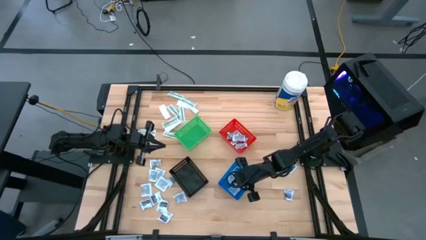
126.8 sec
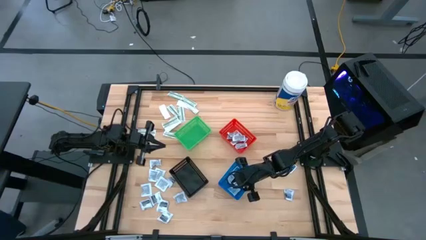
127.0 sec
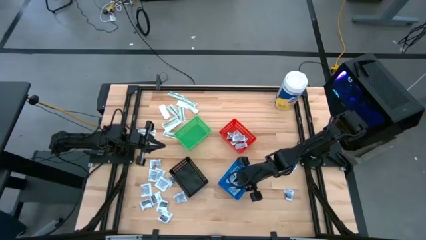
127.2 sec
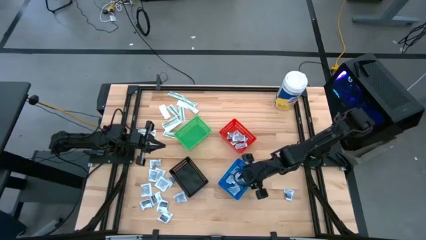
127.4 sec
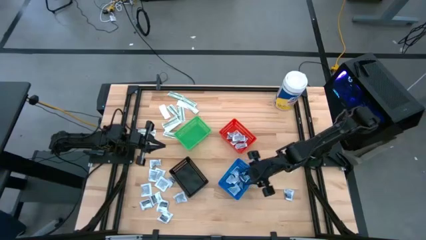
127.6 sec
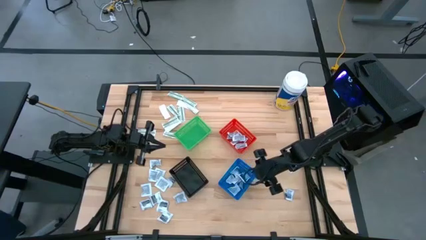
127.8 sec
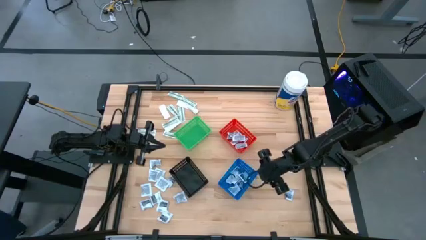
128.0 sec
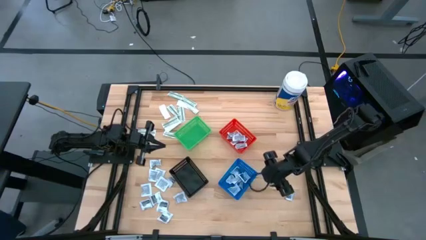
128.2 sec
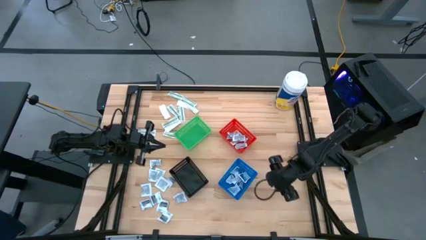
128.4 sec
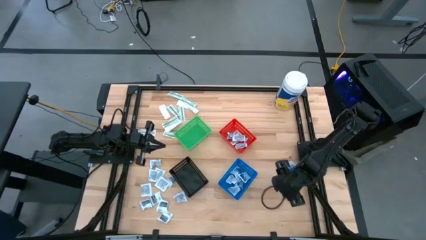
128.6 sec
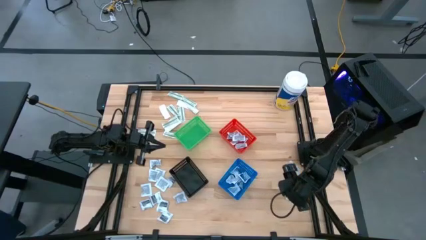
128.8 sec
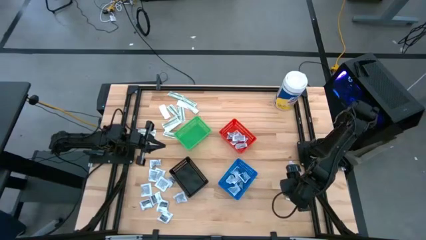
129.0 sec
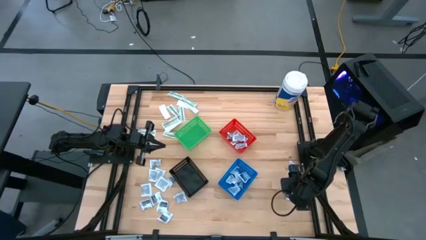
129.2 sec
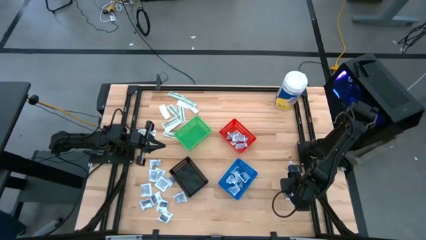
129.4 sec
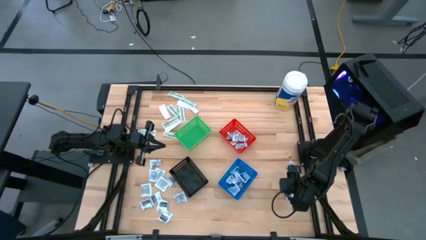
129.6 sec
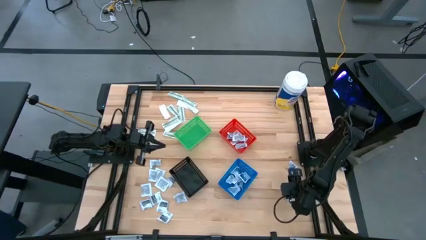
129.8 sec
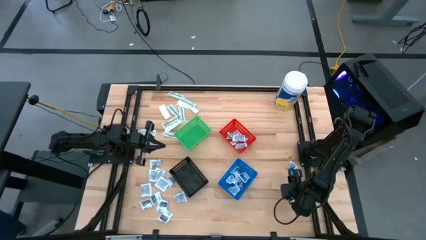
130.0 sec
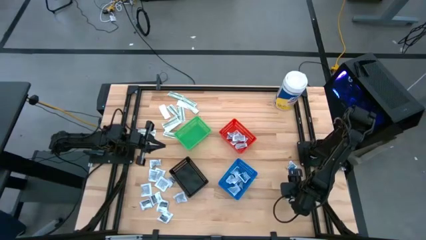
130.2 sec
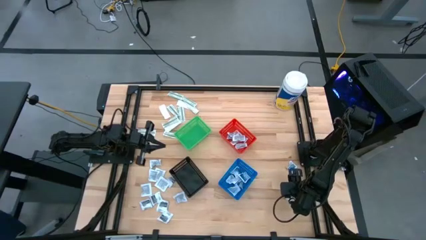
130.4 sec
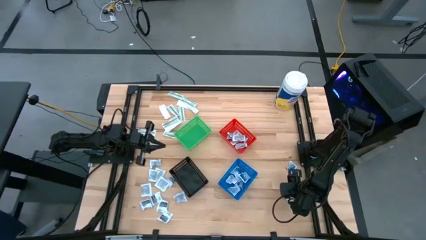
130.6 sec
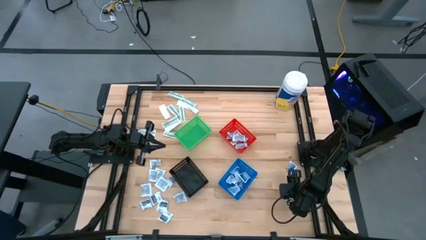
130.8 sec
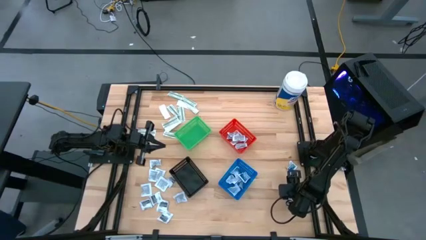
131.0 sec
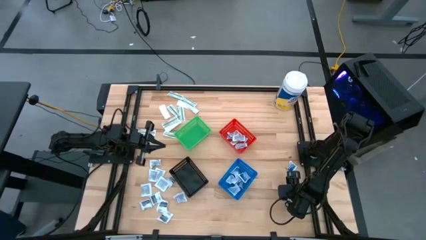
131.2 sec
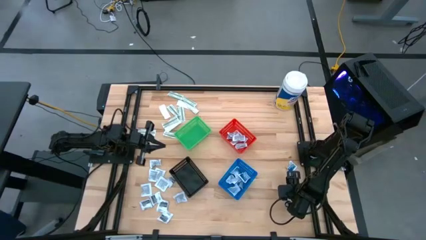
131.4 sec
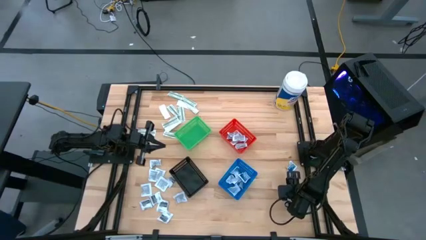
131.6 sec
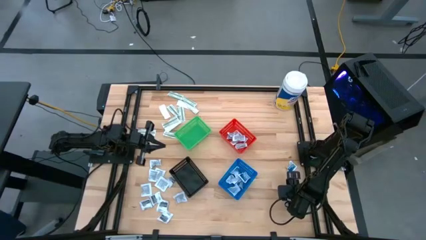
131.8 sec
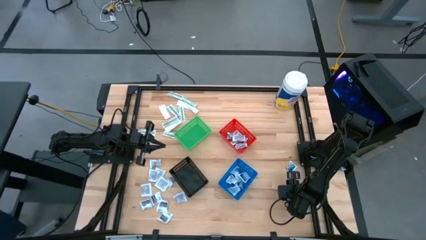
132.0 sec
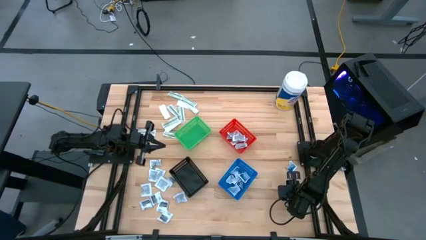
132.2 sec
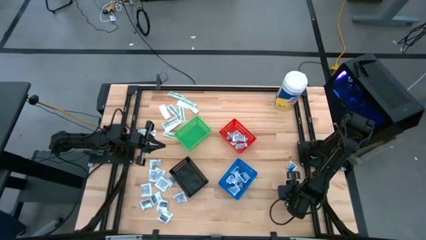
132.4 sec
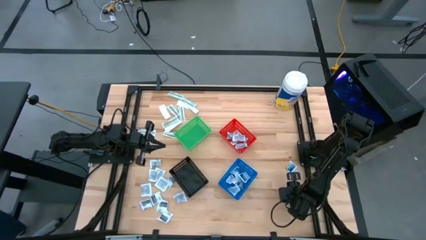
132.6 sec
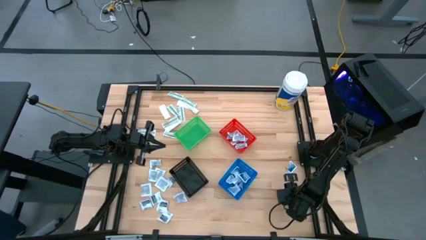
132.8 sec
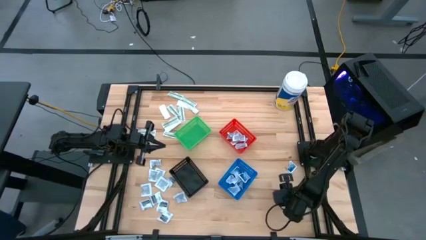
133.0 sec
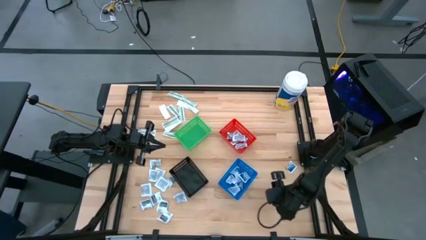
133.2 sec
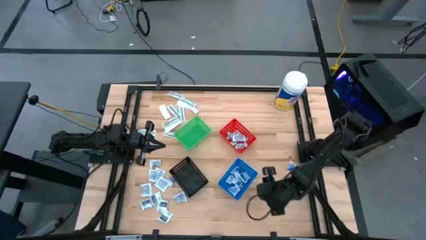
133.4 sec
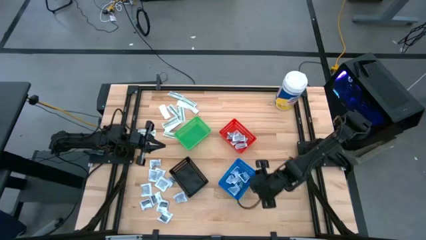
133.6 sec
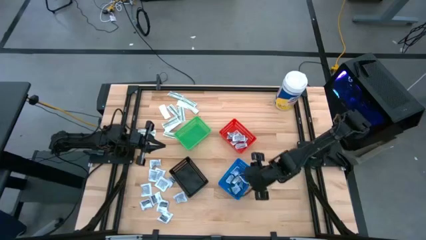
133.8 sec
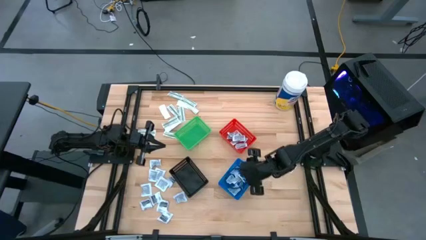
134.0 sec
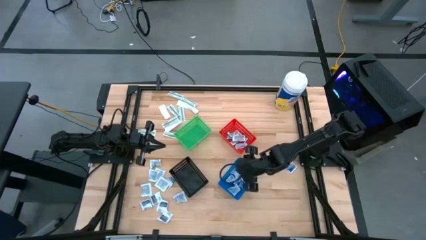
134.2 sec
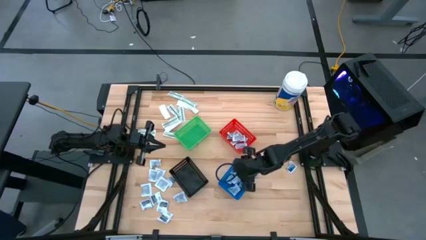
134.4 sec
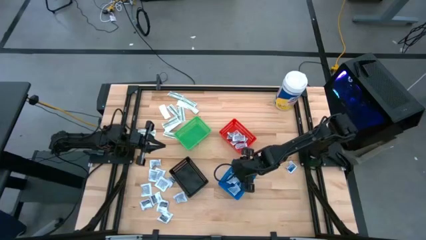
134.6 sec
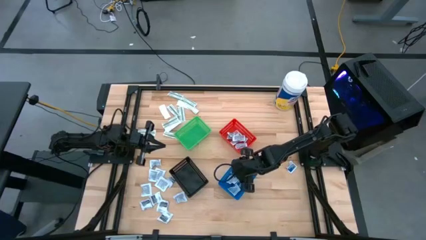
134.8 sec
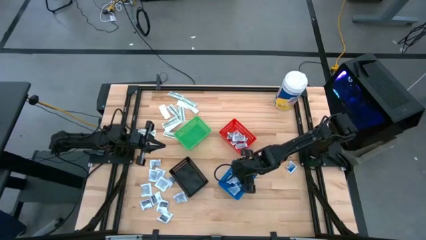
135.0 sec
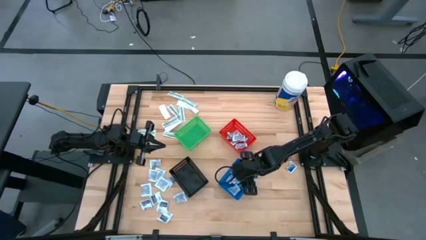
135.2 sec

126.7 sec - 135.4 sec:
Task: Pick & Place First Aid Supplies
Put the blue alcohol pad into the blue bin

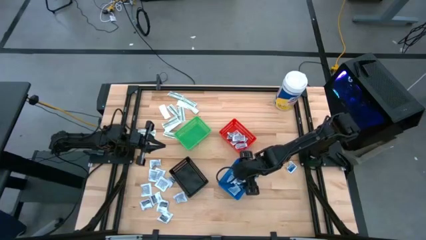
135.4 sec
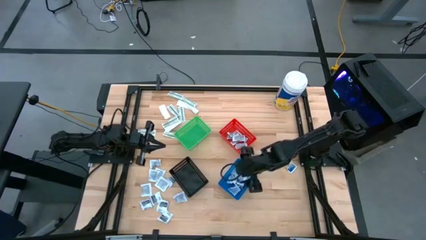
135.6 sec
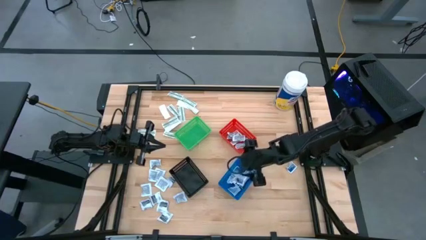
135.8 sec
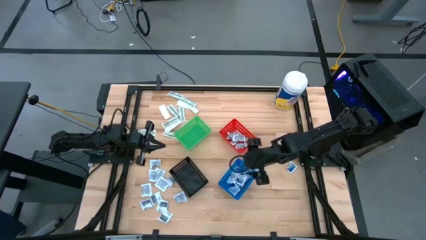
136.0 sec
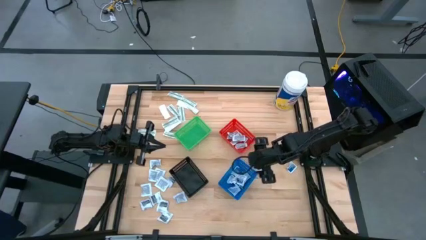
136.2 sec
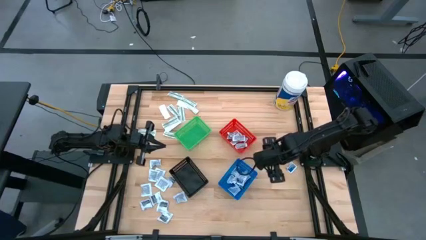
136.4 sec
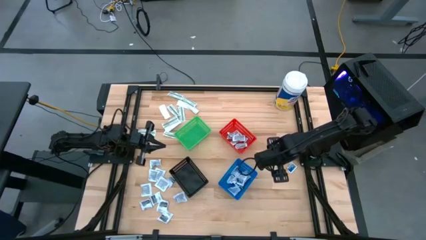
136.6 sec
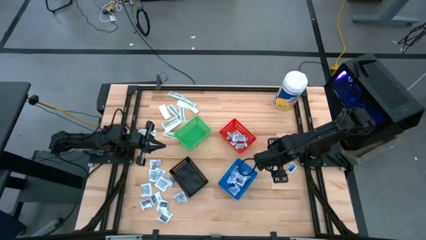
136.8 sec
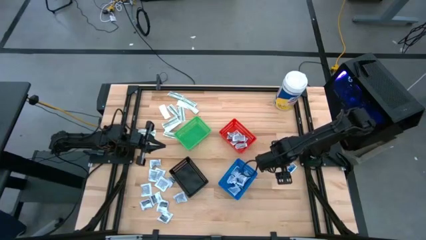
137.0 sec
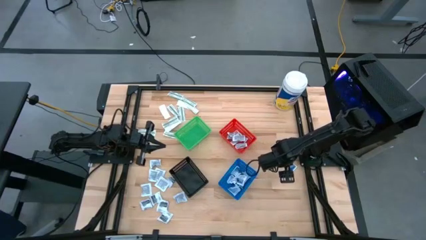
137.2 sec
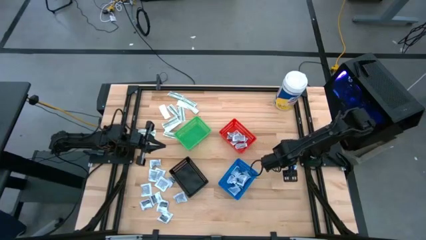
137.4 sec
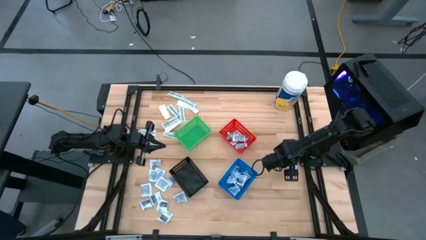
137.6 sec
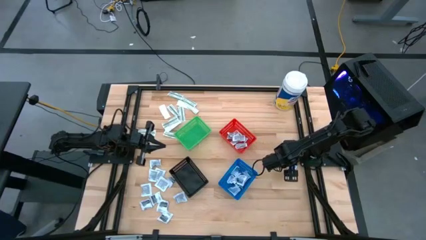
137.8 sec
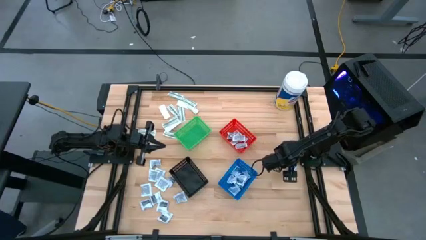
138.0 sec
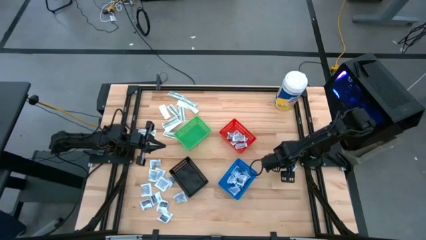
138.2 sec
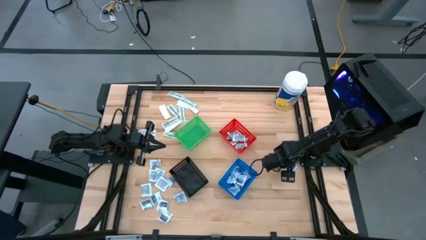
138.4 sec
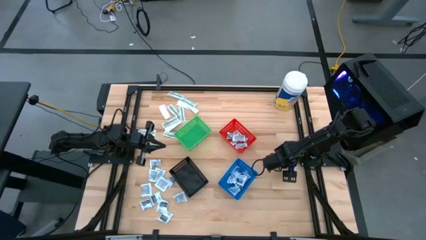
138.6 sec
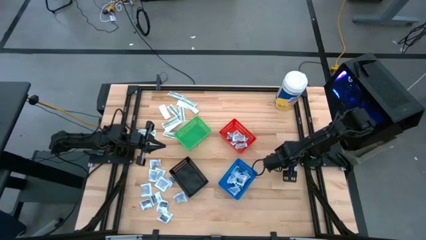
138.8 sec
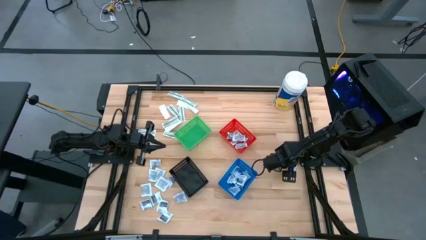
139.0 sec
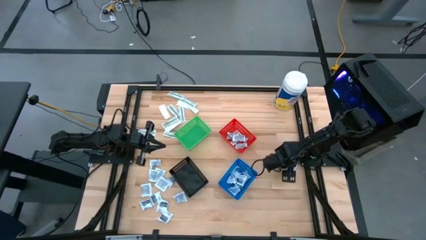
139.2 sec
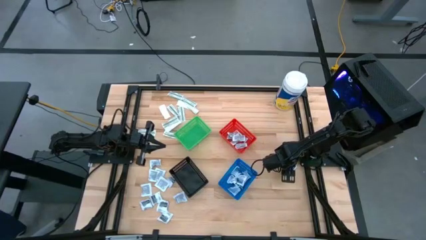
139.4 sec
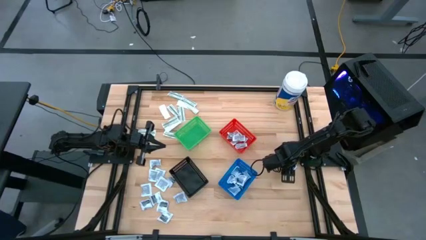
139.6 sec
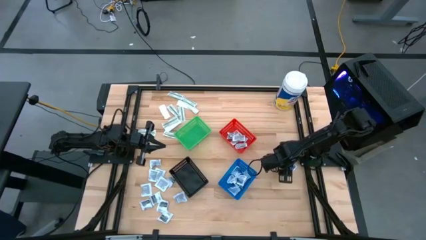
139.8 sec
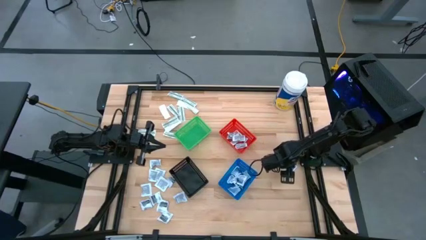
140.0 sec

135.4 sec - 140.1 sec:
Put the blue alcohol pad into the blue bin
